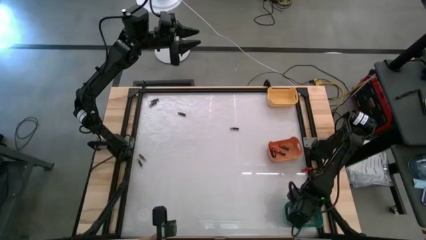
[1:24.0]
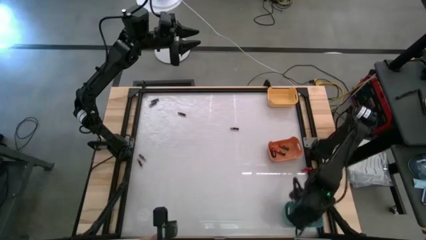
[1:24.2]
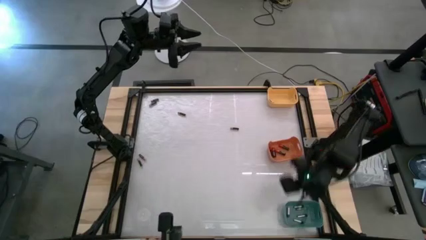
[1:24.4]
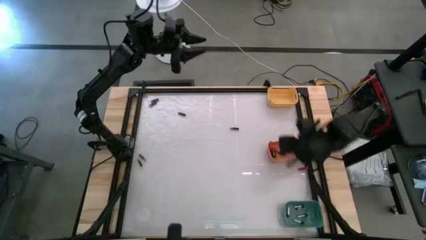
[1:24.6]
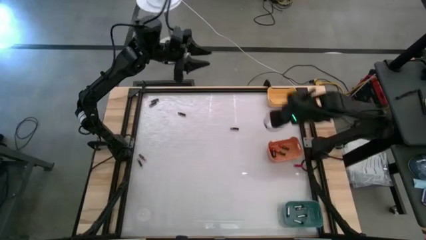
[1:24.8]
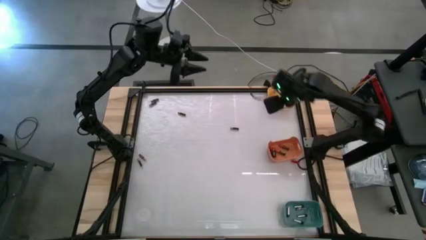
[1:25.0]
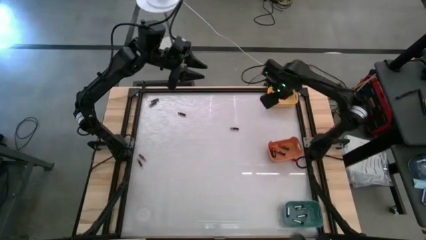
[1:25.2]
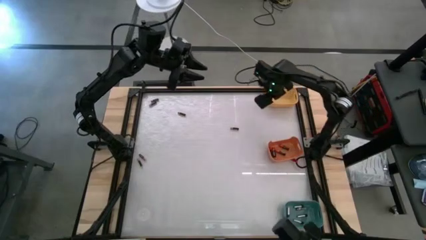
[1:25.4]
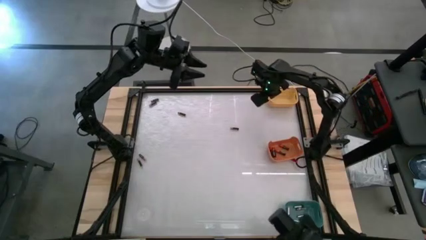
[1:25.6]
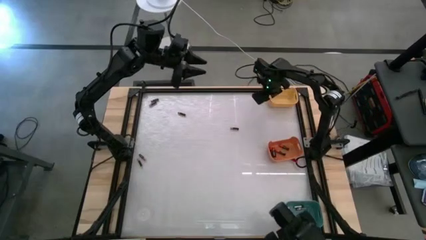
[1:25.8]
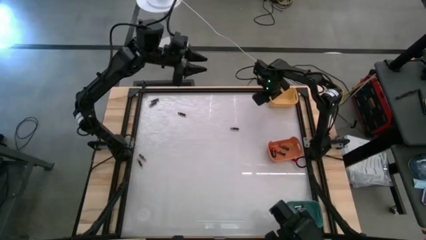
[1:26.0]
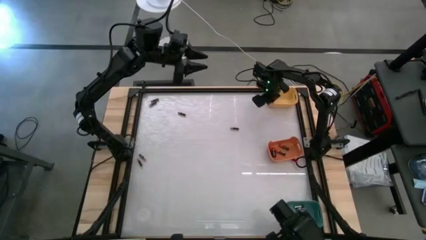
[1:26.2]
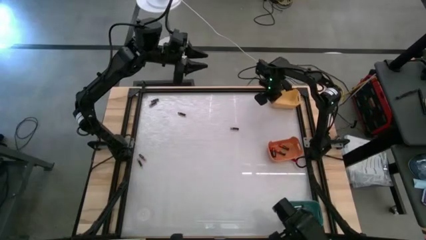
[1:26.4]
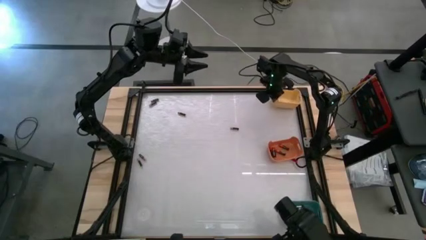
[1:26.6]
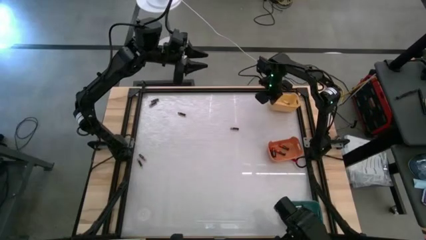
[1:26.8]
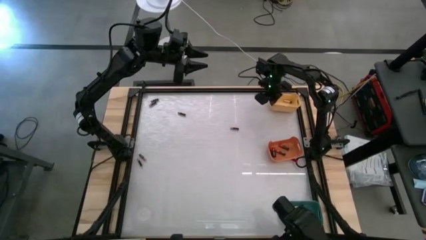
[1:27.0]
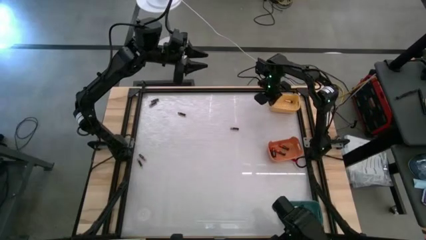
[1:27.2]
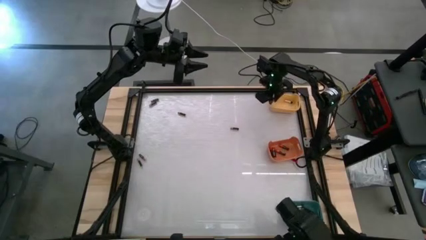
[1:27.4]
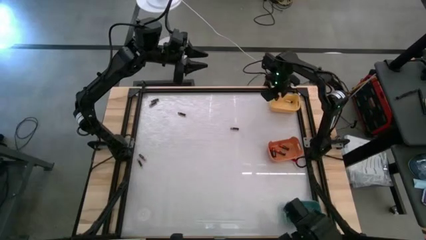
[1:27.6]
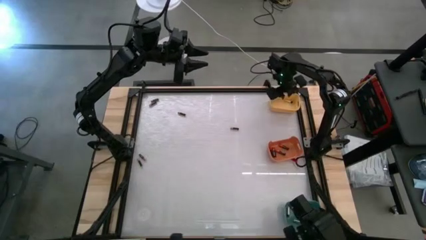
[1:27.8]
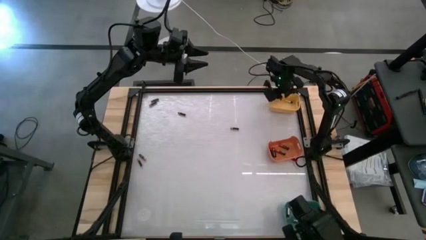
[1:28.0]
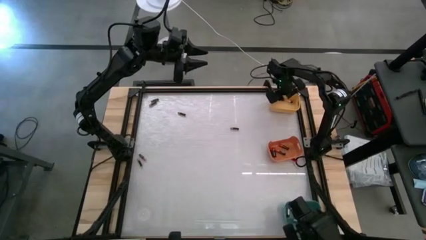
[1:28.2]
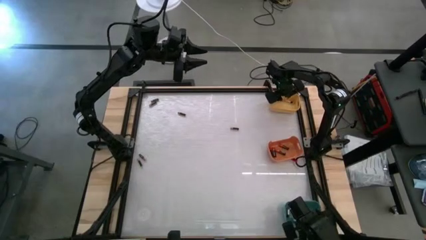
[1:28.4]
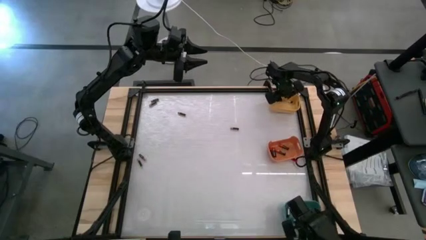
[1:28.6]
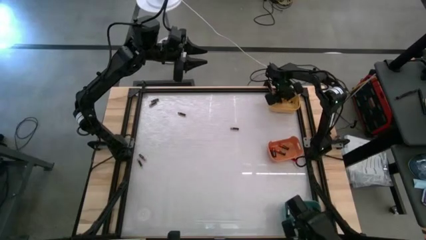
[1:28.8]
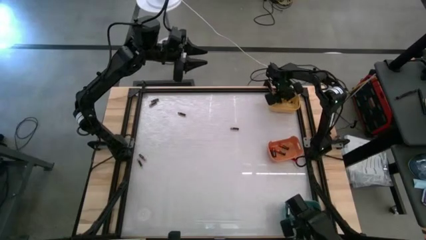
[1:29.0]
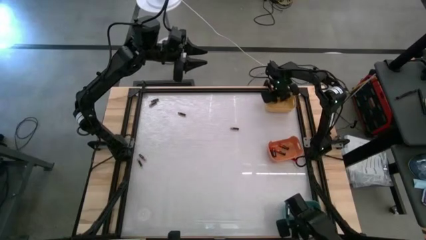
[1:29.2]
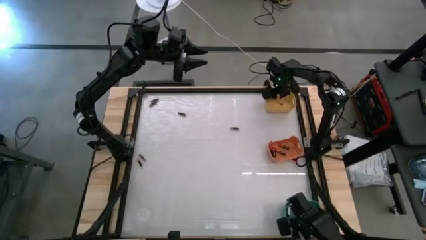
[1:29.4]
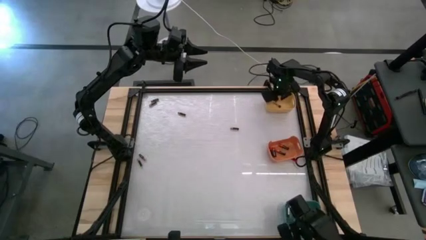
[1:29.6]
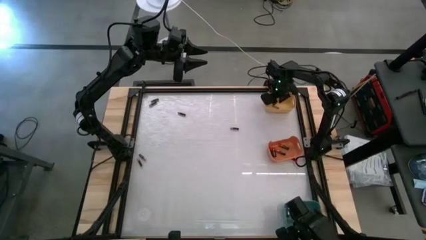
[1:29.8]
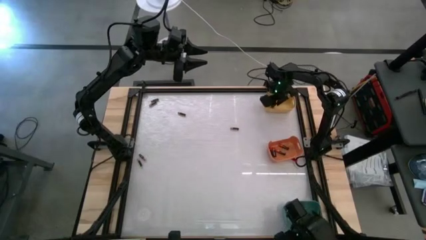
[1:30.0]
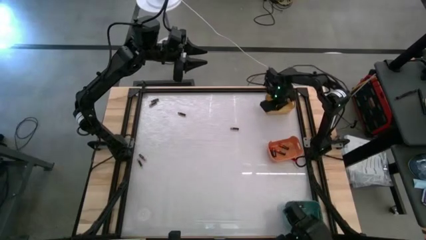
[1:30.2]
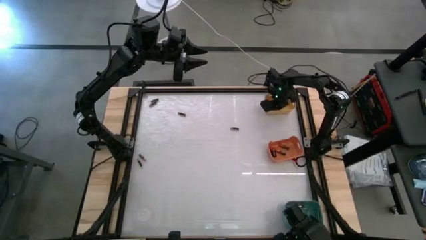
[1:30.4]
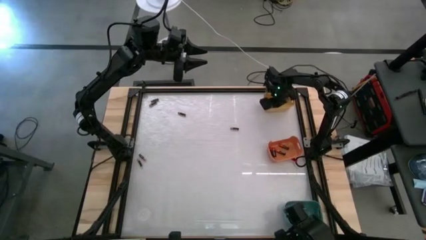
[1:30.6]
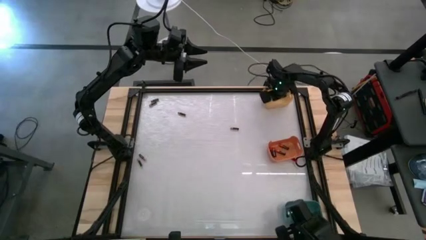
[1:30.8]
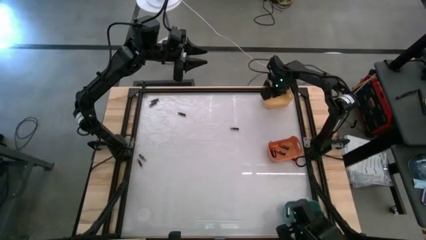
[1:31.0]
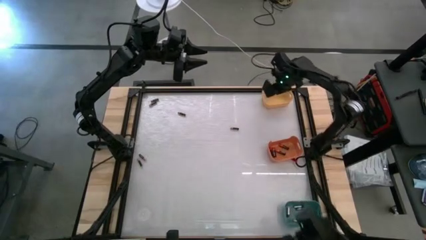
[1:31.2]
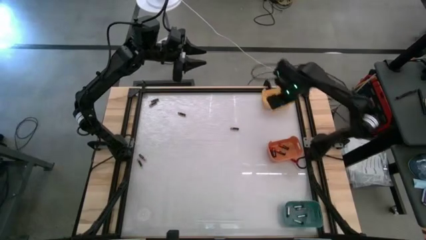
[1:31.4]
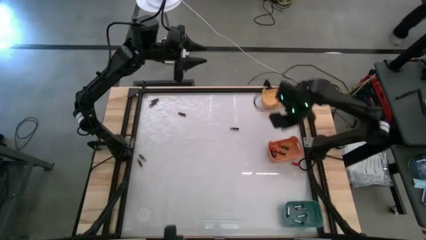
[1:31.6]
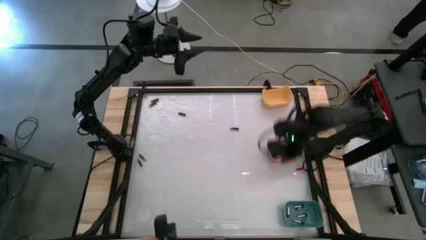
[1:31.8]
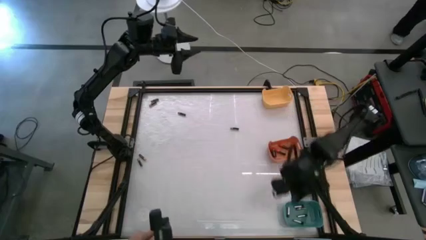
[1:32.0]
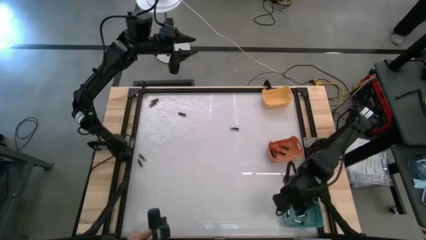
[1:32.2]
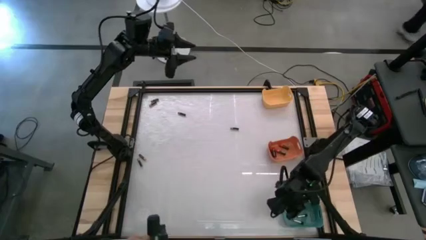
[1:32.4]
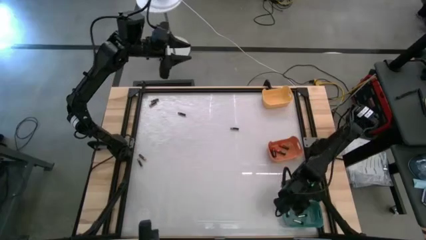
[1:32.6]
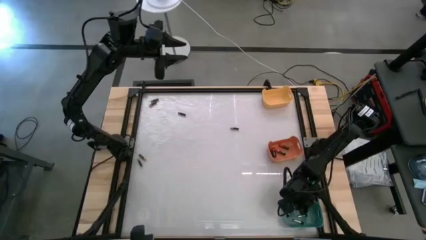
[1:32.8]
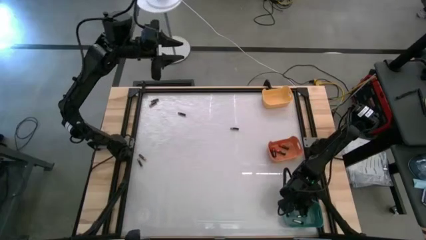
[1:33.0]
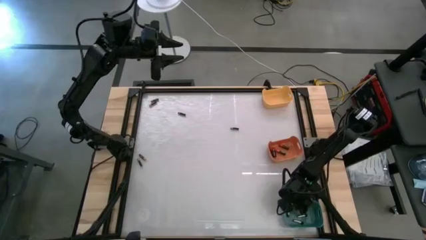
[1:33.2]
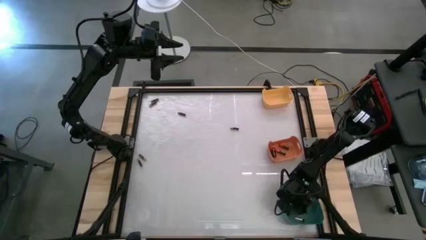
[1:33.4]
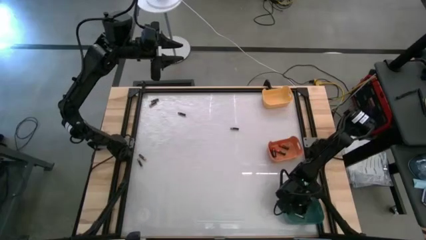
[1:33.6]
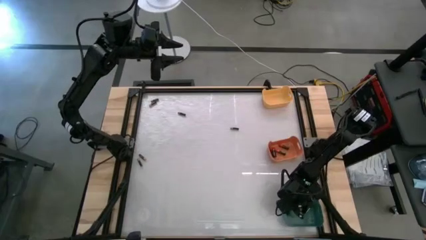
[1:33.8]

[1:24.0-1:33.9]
Task: Sort batteries
Put the silver battery into the green bin

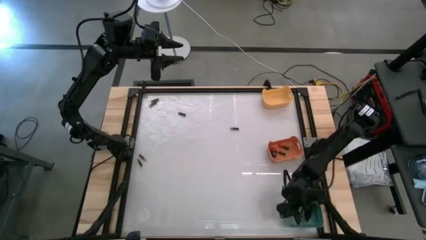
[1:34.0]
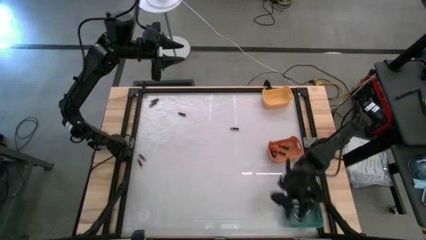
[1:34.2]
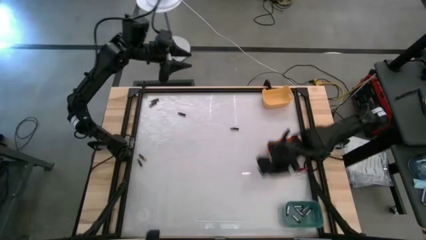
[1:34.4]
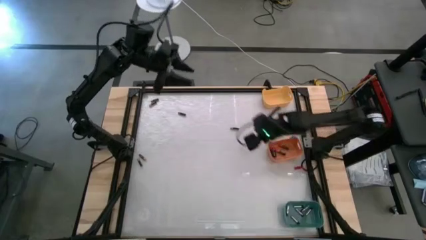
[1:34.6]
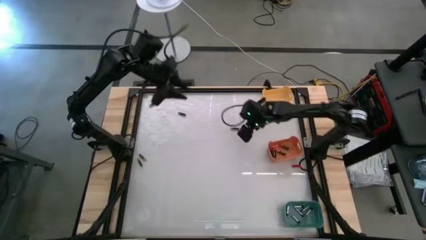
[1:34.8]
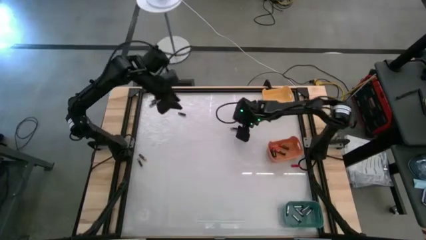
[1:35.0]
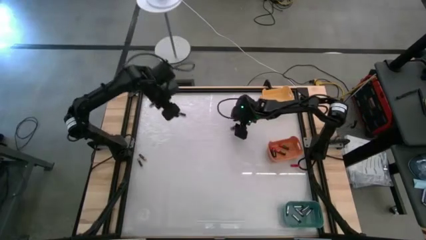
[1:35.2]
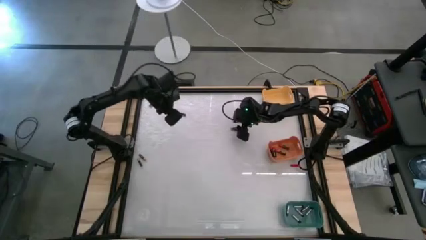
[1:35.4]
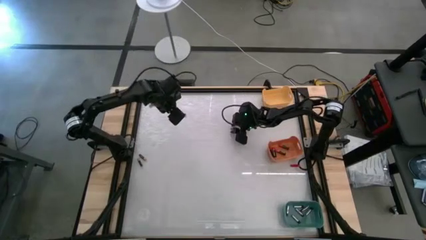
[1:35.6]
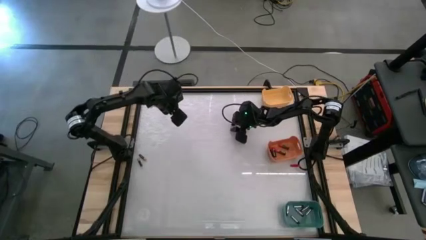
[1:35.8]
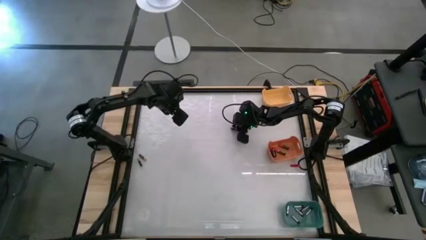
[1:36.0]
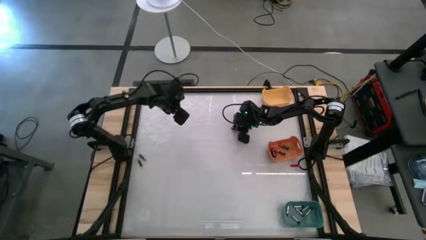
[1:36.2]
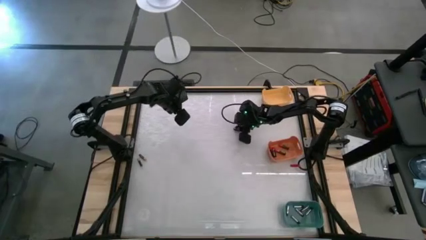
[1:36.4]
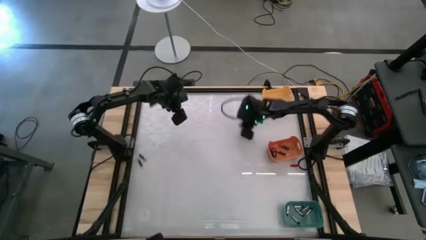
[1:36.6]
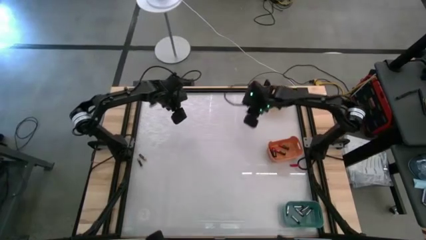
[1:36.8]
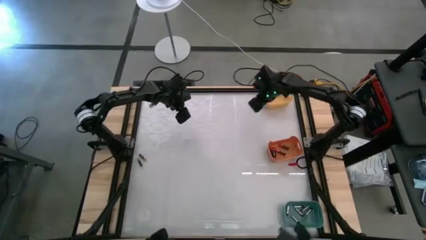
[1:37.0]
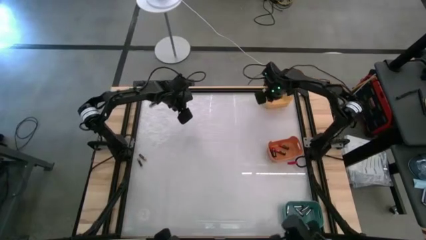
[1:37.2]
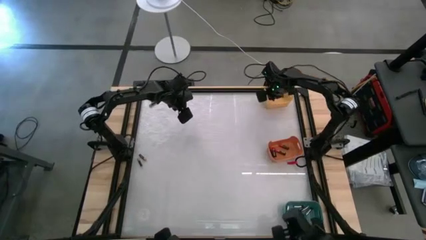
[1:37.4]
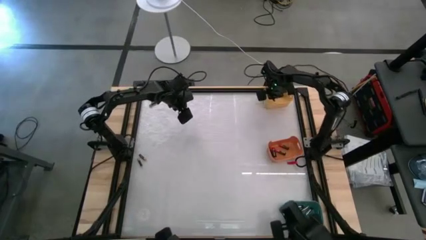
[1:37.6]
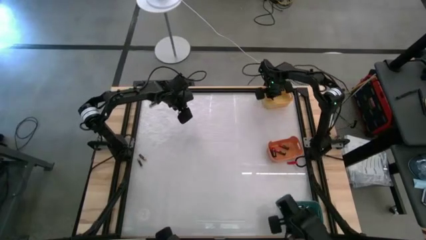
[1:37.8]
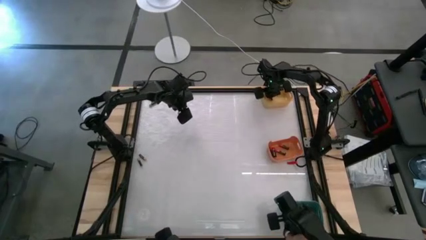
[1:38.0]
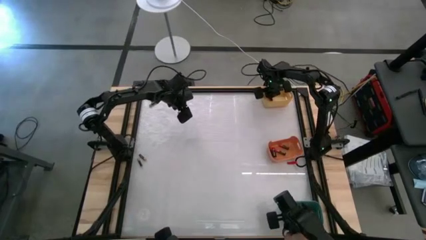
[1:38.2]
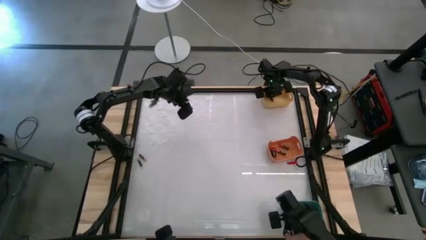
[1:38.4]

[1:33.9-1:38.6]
Put the black-orange battery into the yellow bin

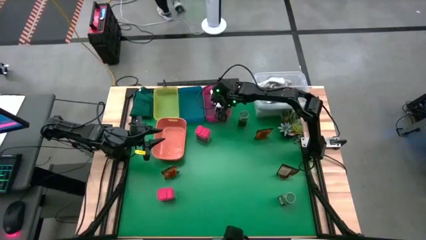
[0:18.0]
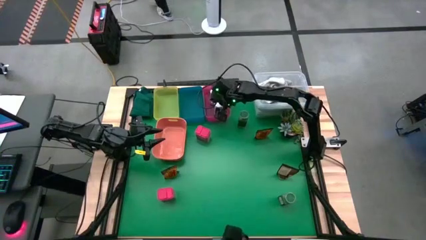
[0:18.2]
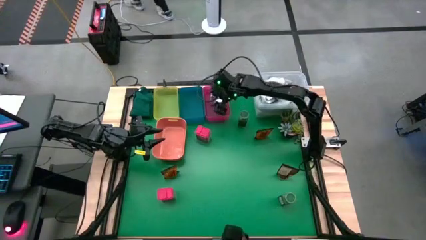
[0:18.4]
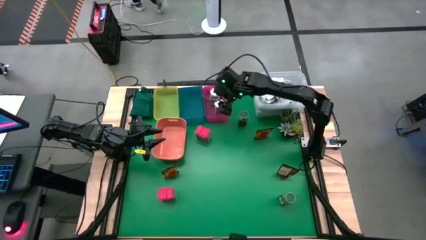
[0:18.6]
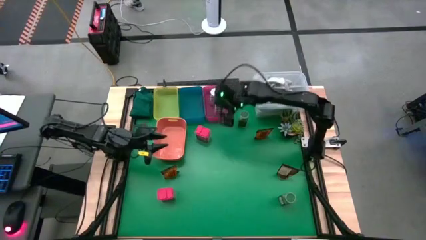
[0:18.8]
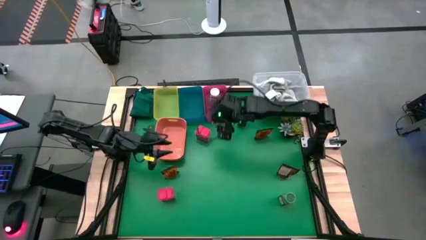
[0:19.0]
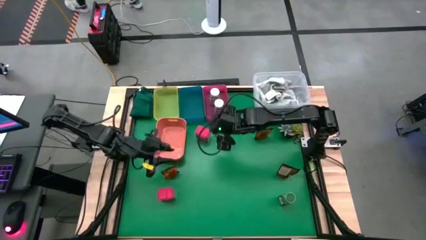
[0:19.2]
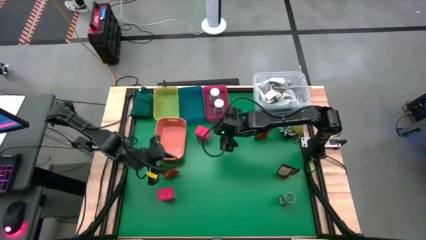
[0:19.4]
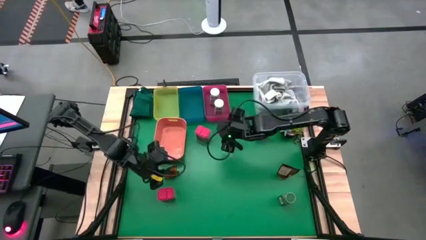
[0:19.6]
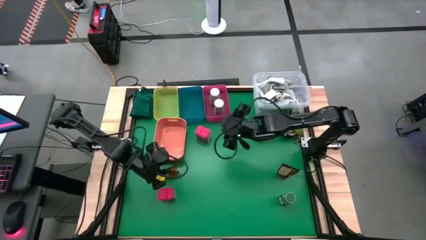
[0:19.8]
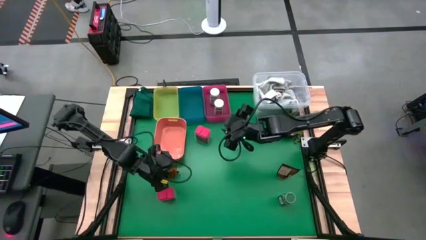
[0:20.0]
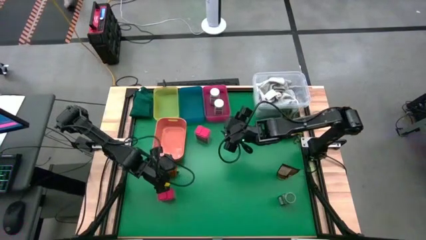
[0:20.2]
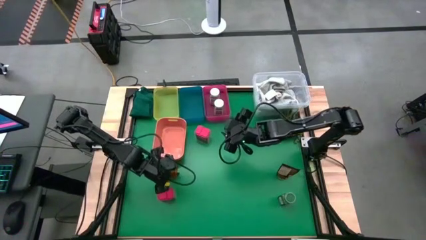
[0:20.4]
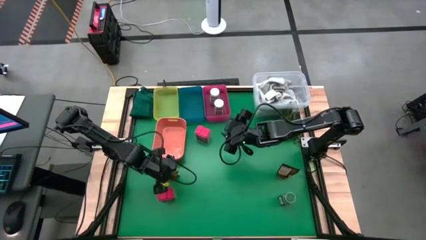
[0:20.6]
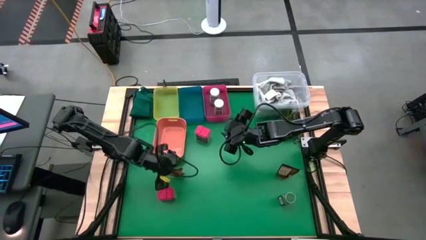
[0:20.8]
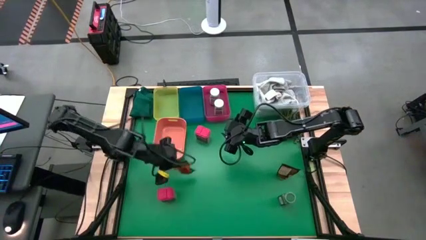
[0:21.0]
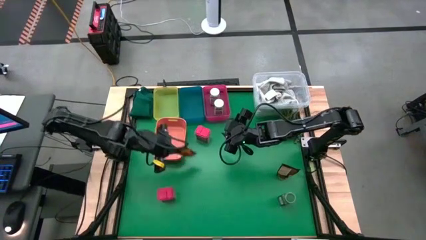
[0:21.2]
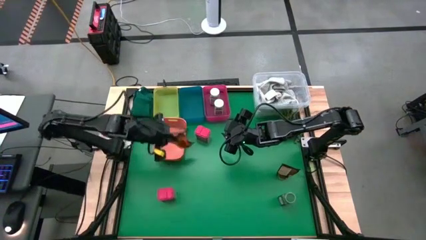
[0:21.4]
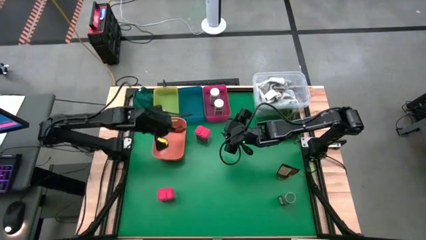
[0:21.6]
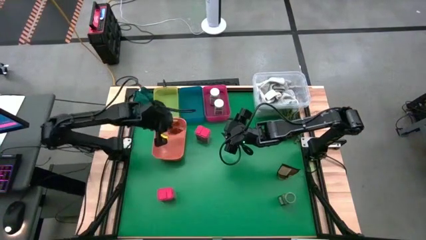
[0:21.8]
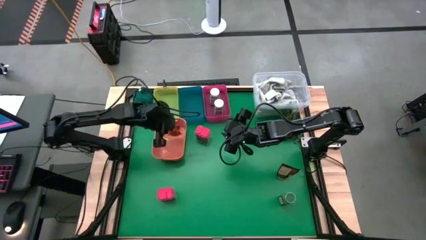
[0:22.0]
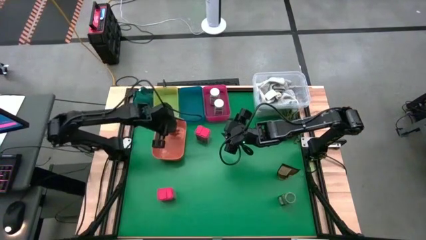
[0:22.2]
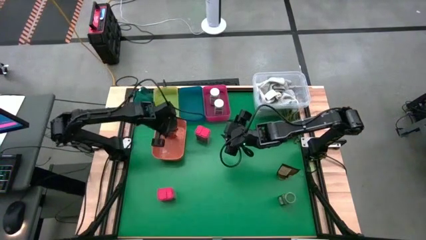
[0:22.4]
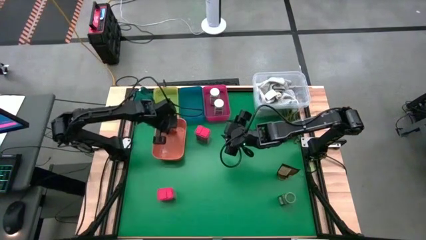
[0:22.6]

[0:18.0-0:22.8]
Task: Sort spices by type
Put the bottom left brown seasoning bag into the orange bin
